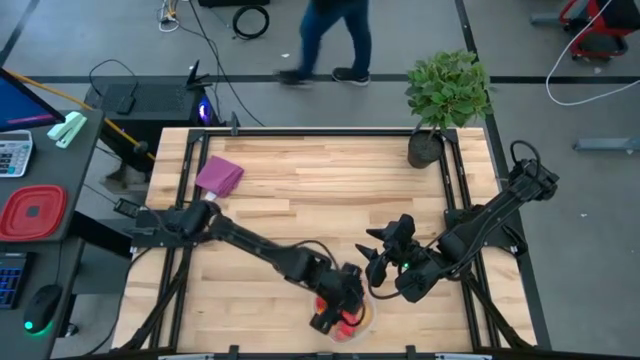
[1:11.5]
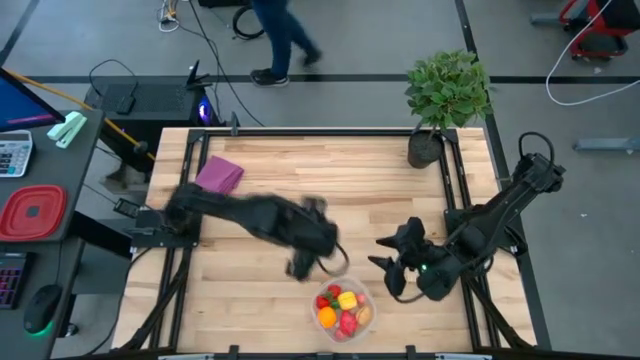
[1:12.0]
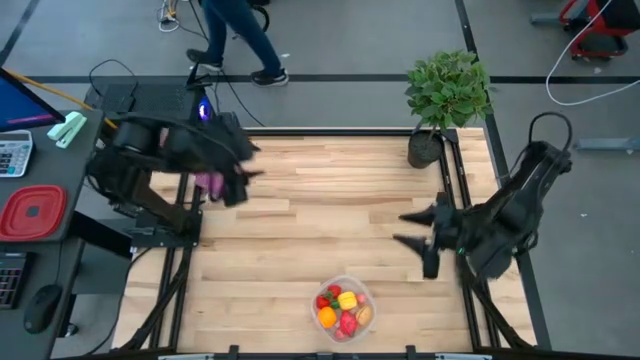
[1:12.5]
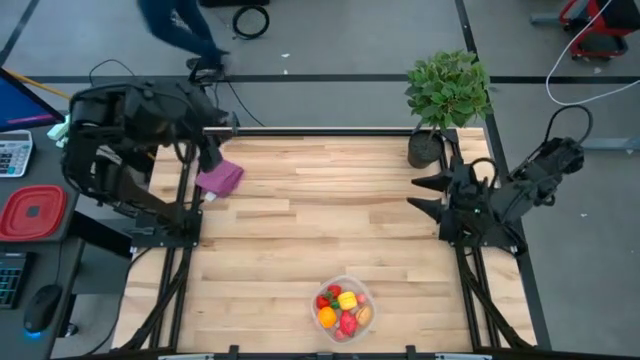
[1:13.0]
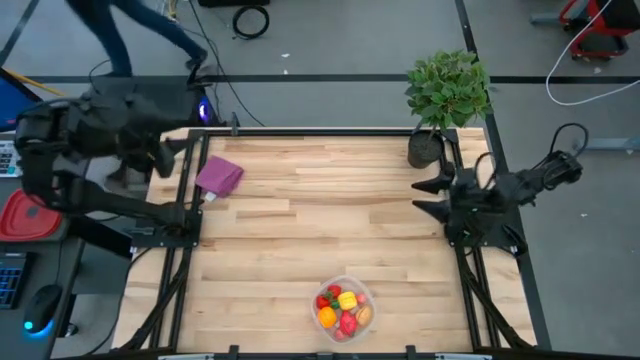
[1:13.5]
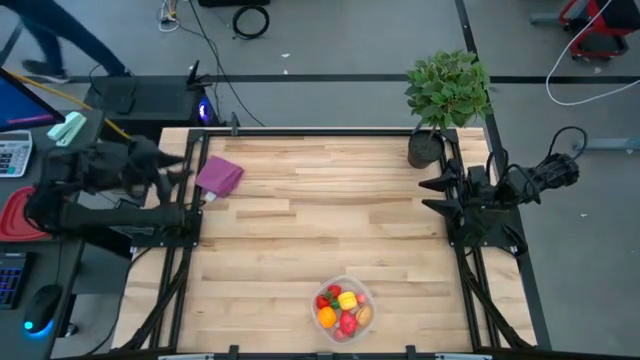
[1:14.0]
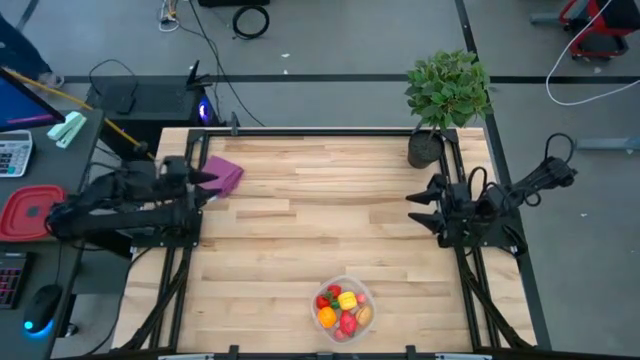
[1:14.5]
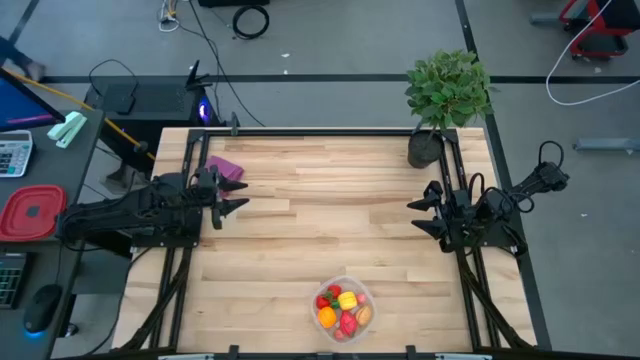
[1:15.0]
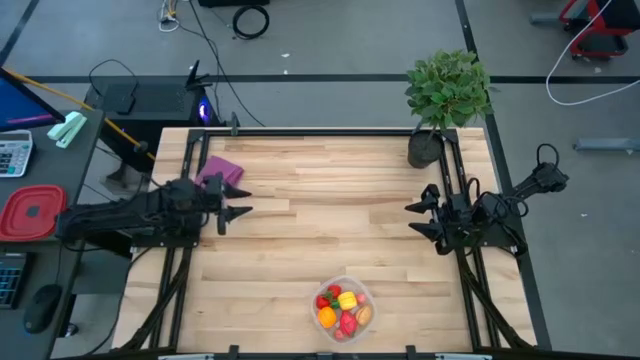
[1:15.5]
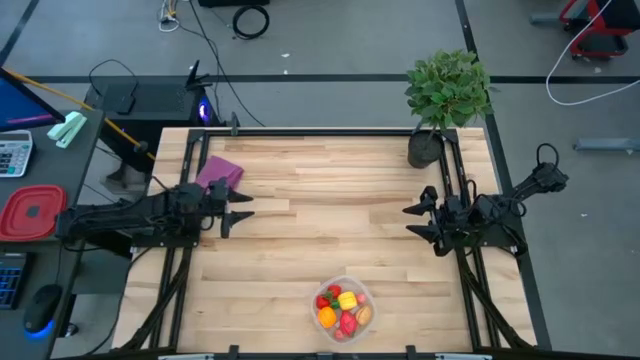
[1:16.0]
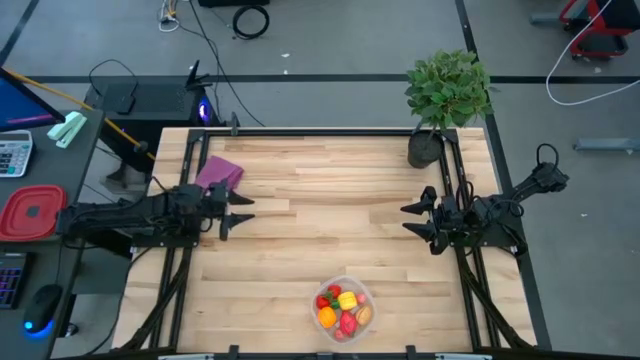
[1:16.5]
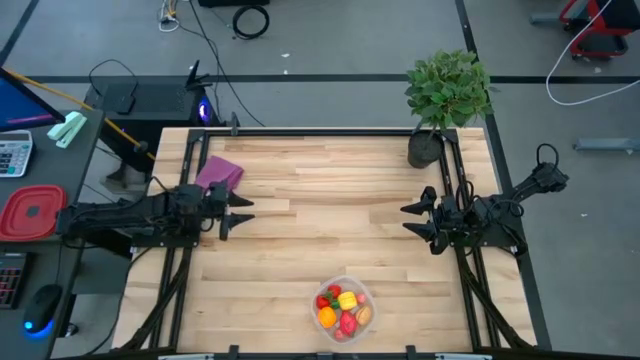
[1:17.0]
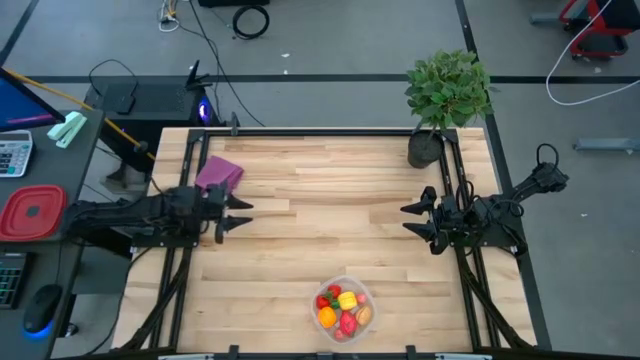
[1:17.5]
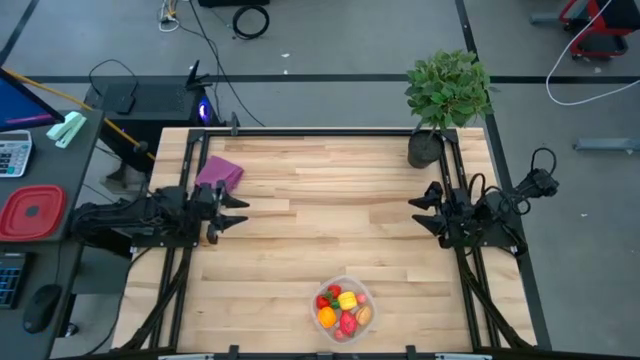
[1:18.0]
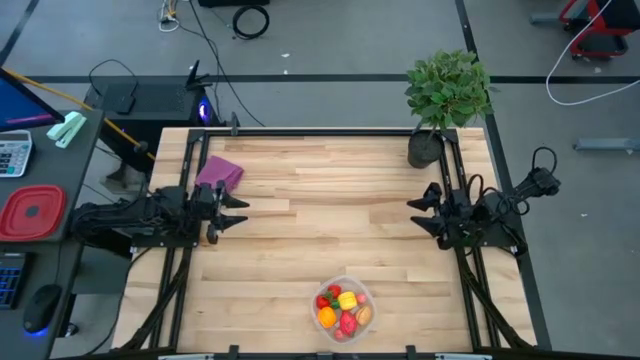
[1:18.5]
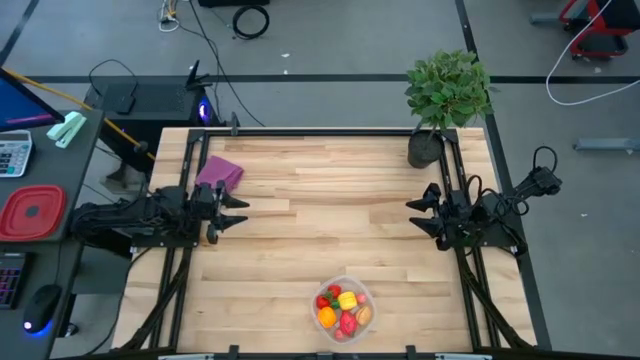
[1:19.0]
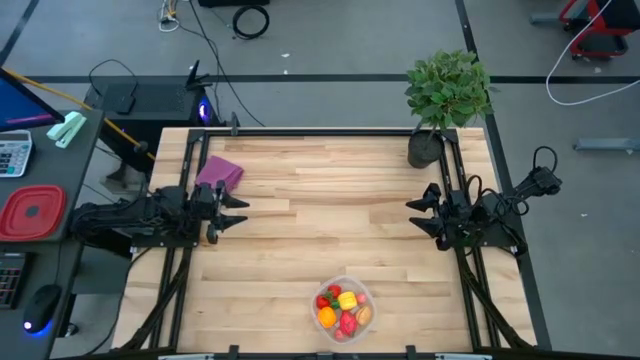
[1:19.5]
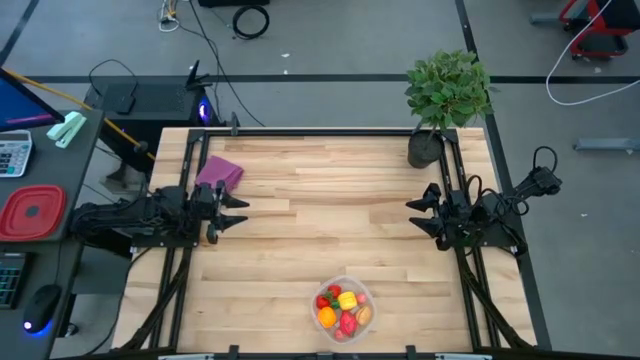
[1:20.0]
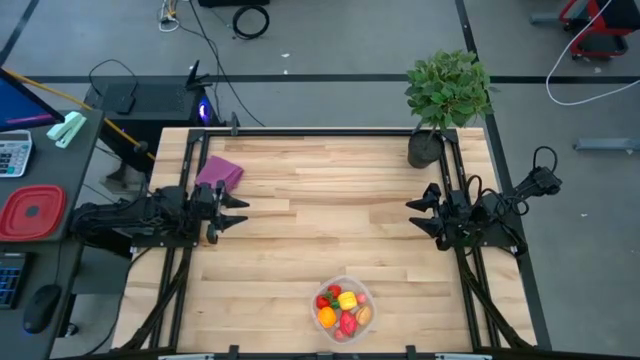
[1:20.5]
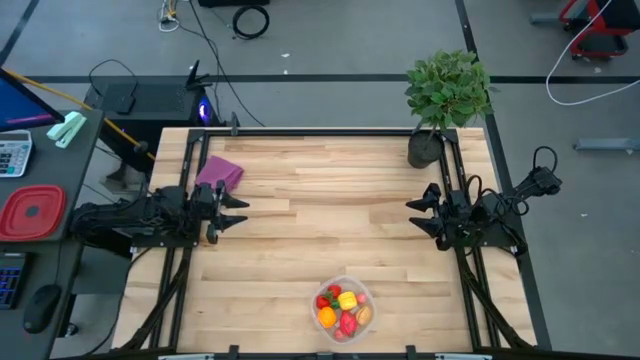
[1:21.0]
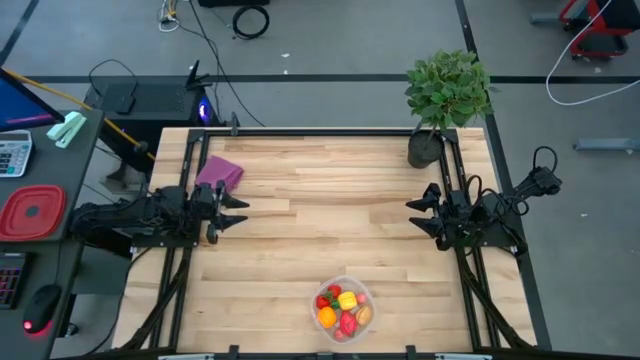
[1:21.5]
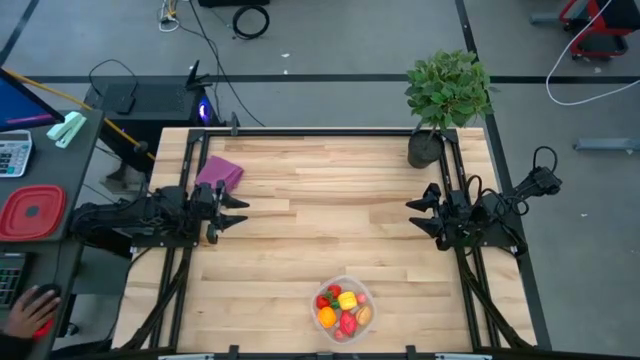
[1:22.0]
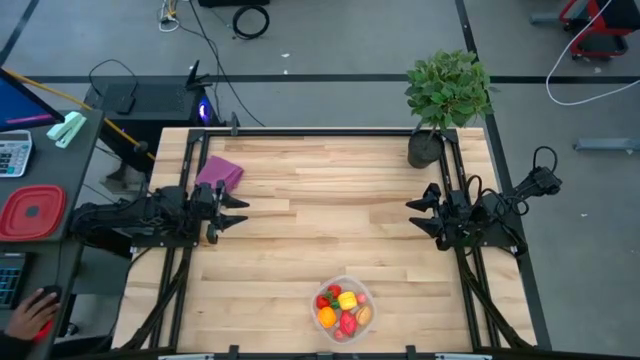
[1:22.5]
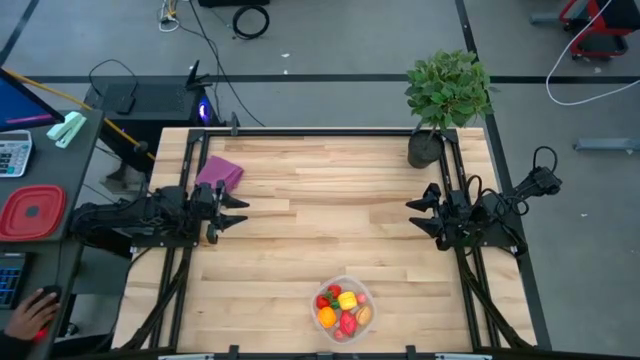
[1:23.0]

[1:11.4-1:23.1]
Task: Pick and placing Produce into tupperware
Return to Home Position

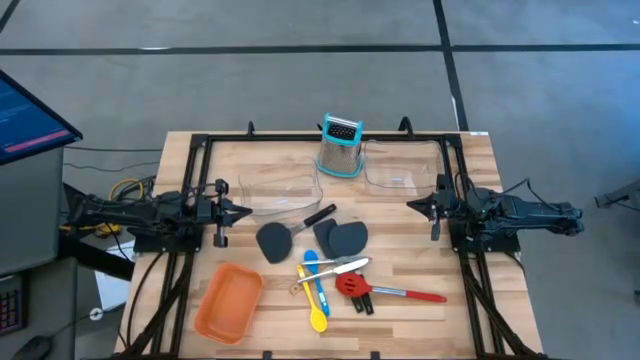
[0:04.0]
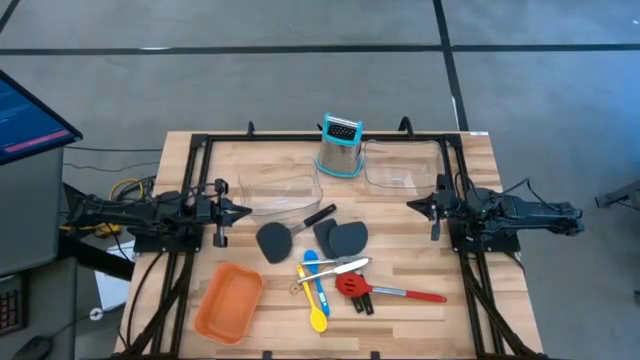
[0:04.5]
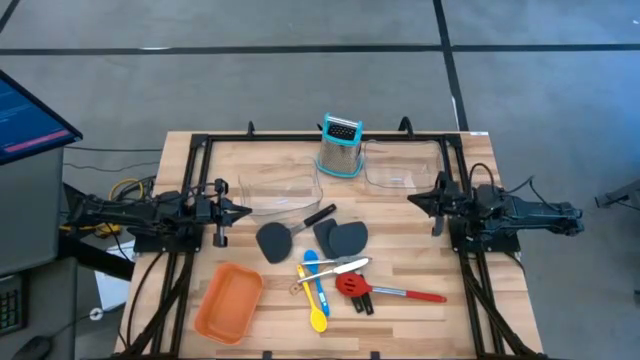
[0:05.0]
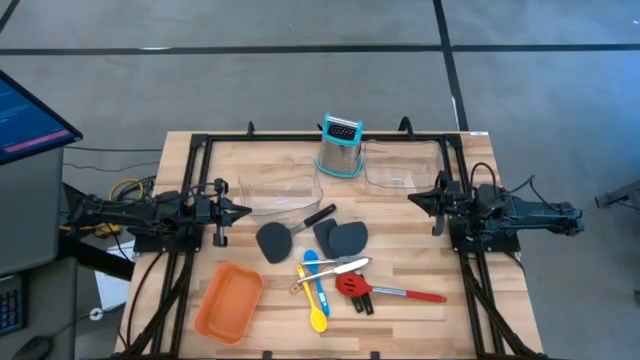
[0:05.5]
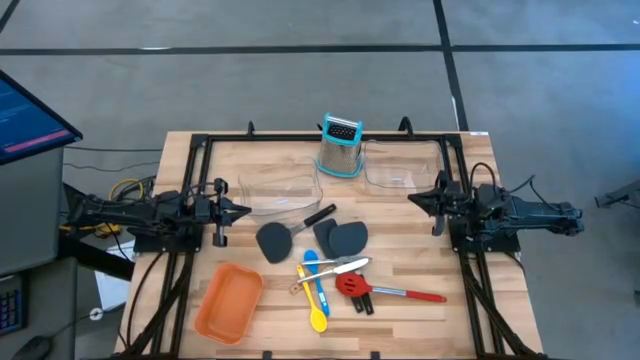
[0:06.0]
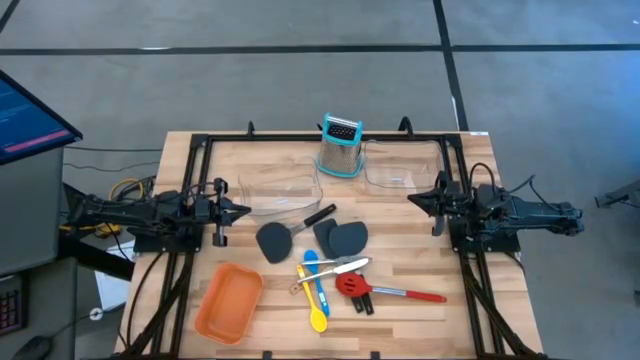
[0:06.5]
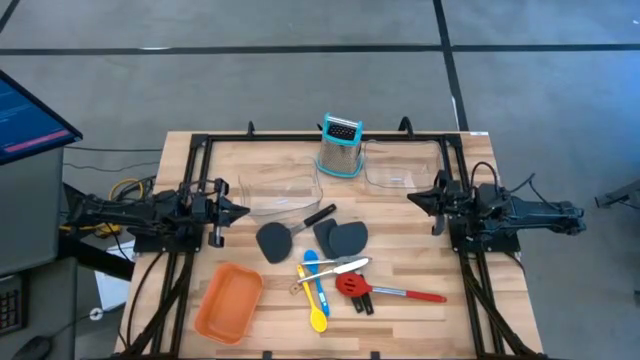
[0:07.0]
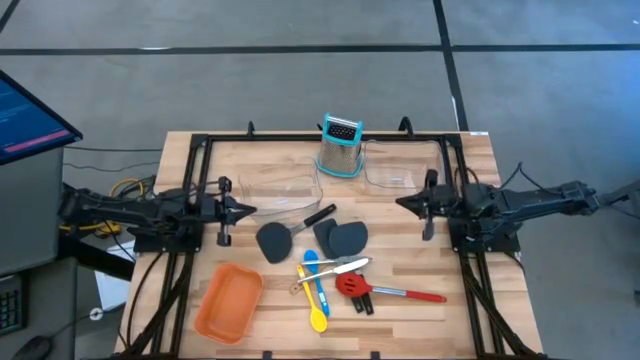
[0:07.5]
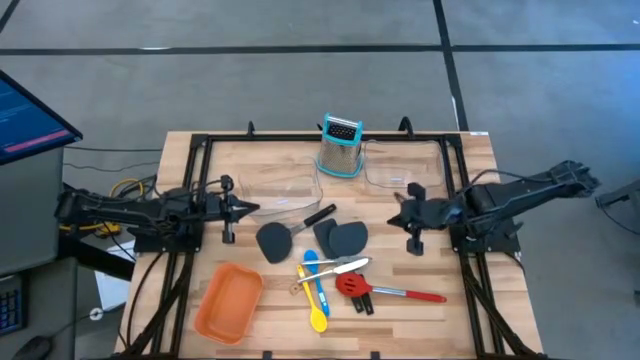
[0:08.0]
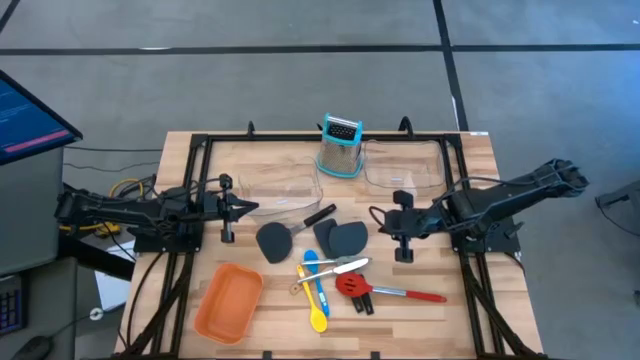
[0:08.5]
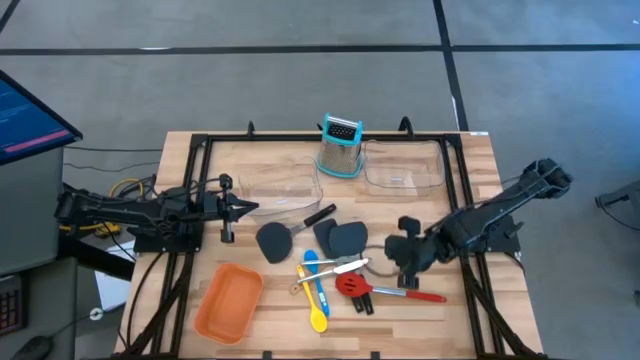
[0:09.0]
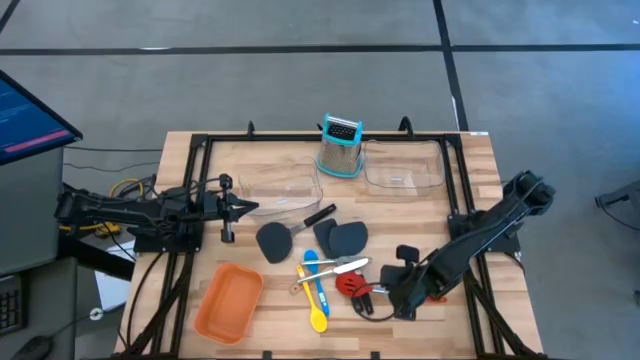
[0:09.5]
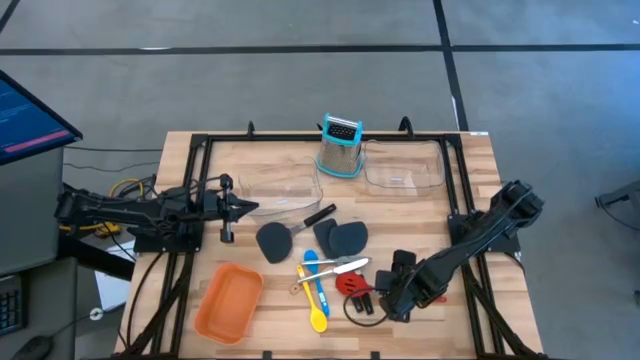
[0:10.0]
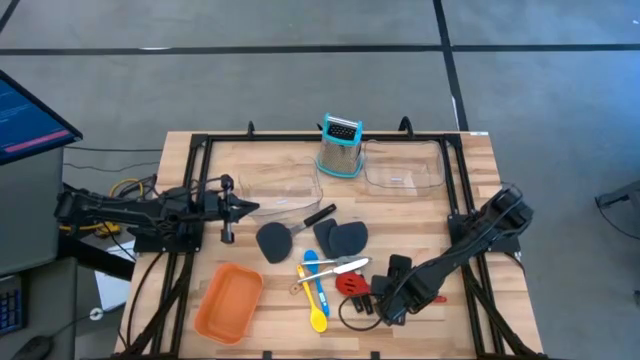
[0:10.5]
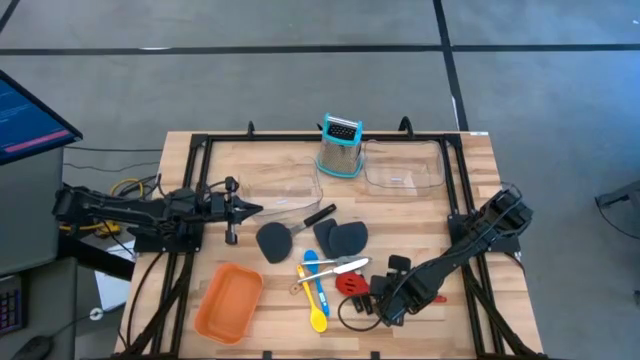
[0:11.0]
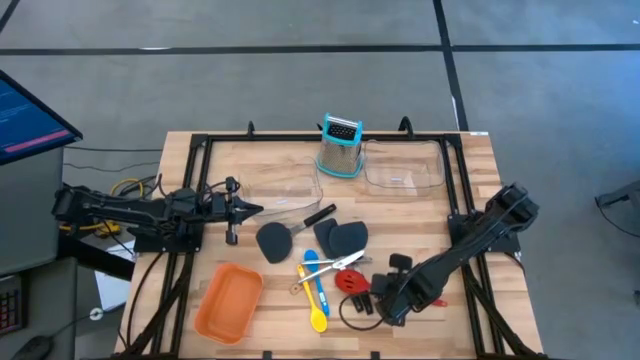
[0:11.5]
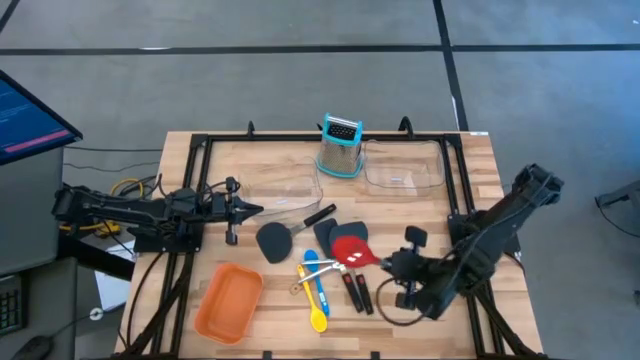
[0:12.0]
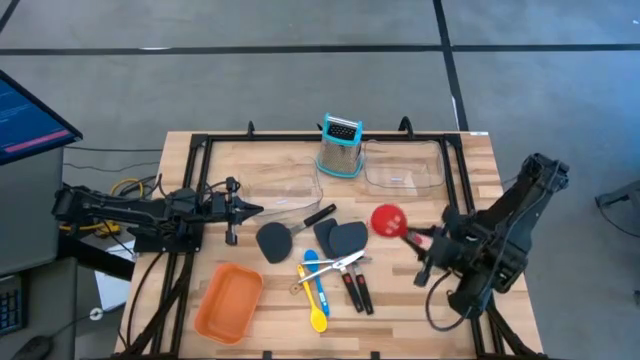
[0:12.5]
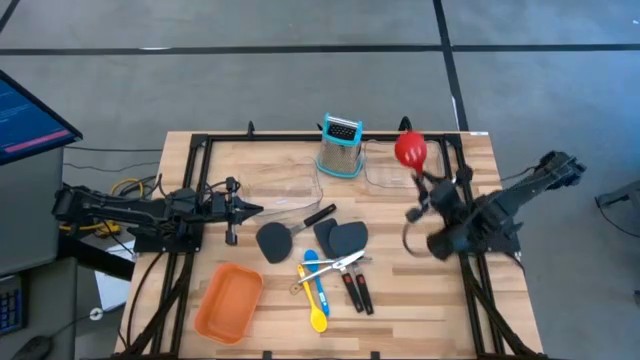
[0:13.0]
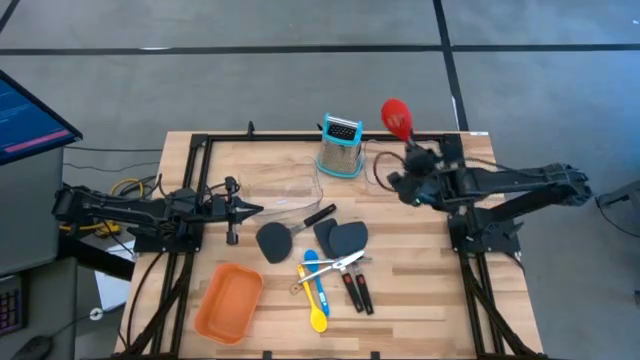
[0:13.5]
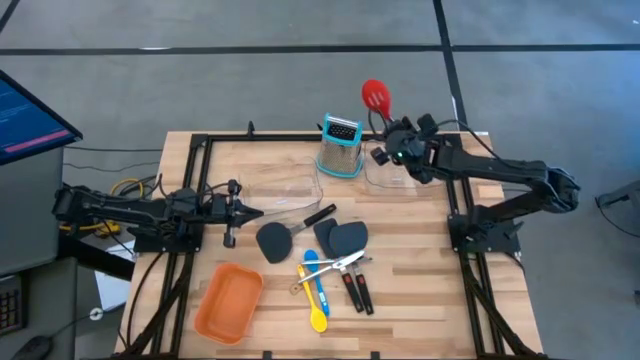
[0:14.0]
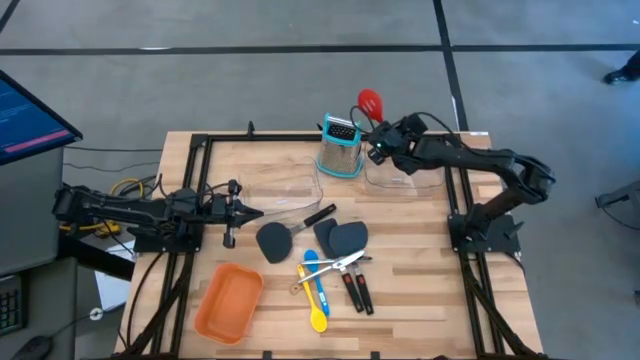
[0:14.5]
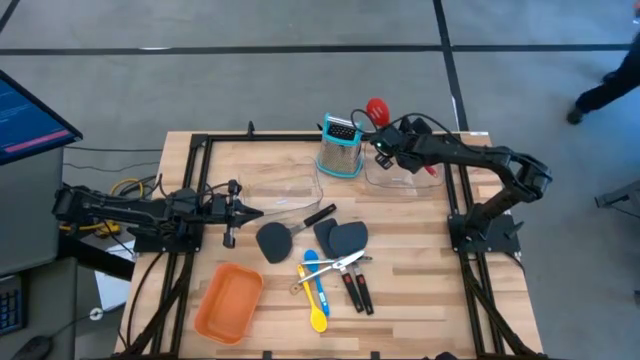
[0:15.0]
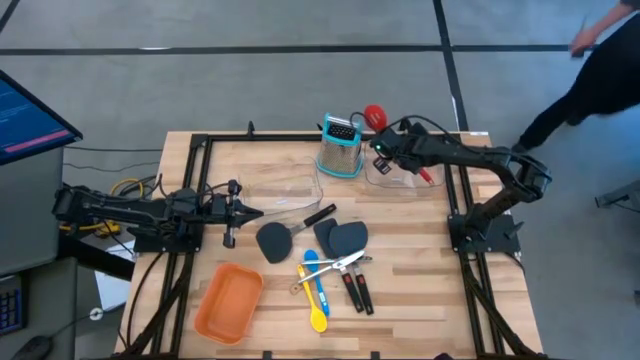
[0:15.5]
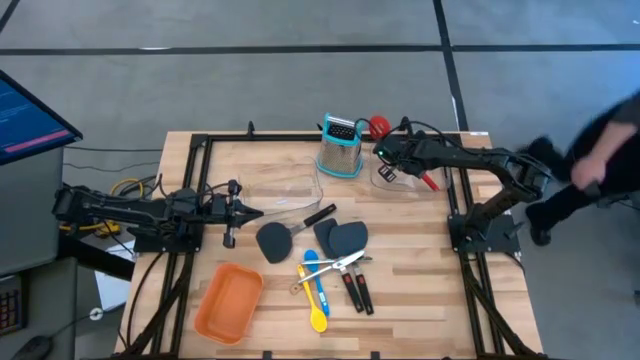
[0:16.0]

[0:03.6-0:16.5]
Task: Pick & Place Kitchen Items
Put the red slotted serving spoon into the right transparent bin
